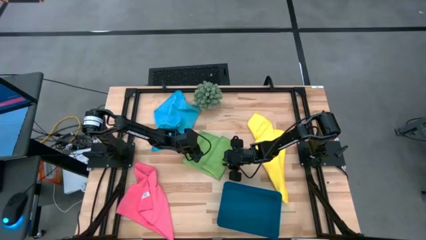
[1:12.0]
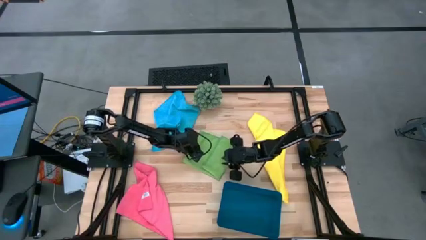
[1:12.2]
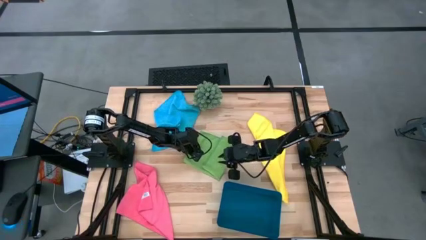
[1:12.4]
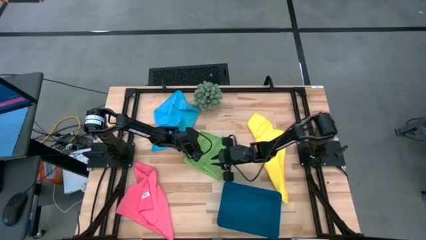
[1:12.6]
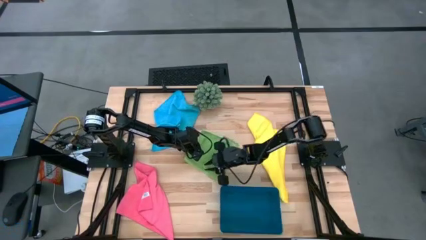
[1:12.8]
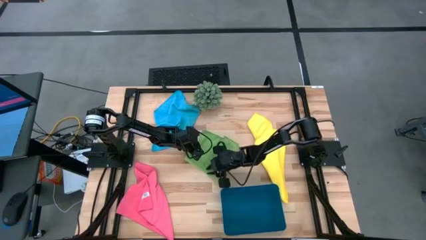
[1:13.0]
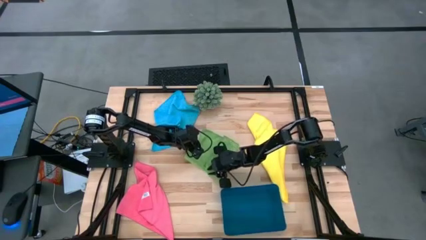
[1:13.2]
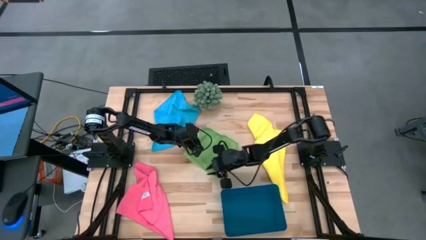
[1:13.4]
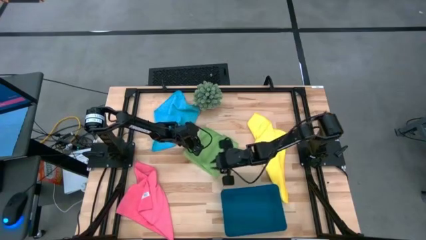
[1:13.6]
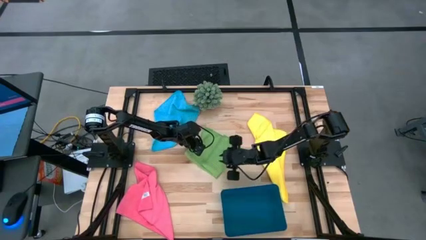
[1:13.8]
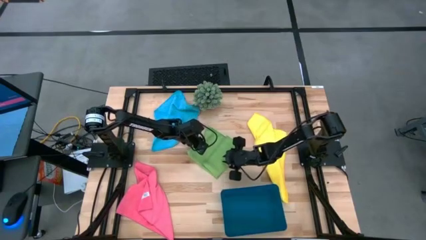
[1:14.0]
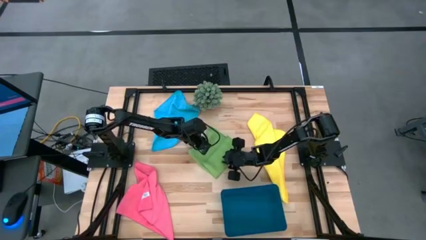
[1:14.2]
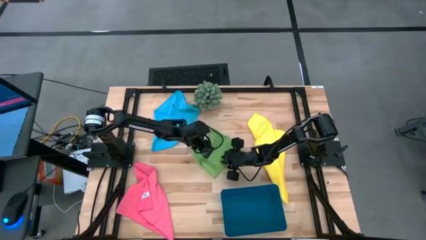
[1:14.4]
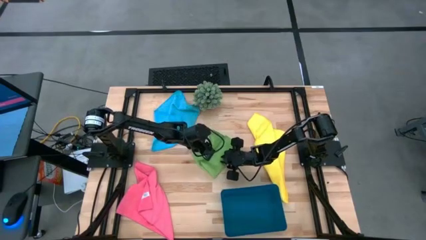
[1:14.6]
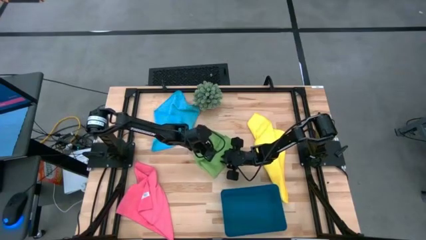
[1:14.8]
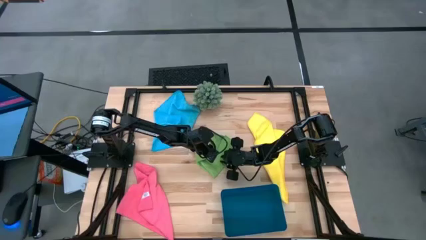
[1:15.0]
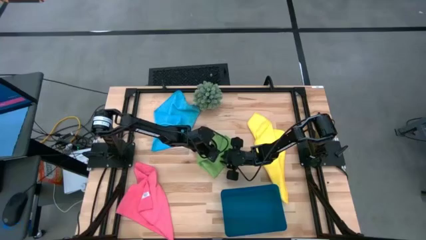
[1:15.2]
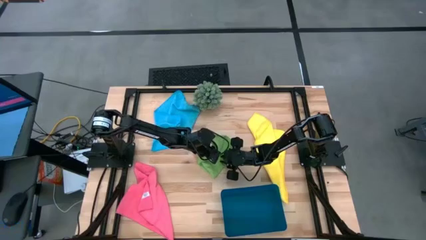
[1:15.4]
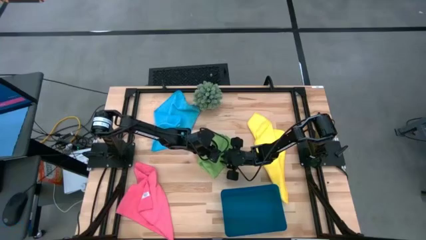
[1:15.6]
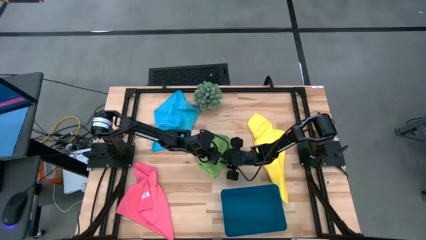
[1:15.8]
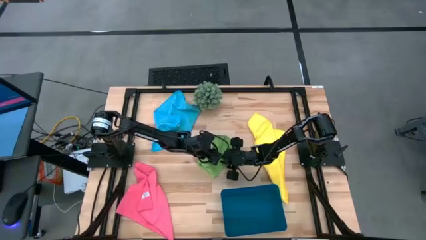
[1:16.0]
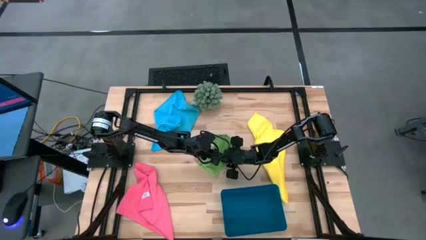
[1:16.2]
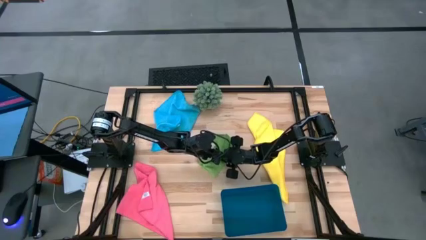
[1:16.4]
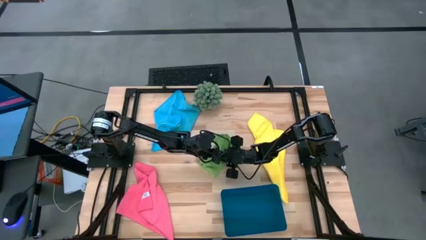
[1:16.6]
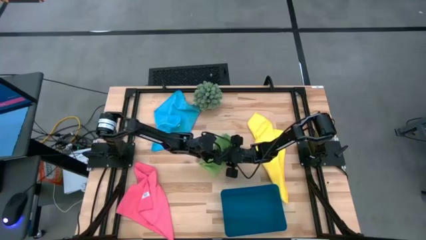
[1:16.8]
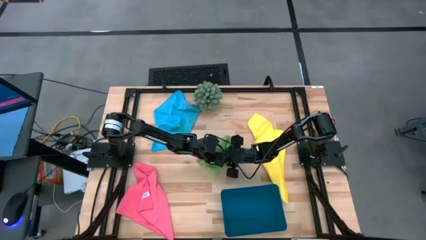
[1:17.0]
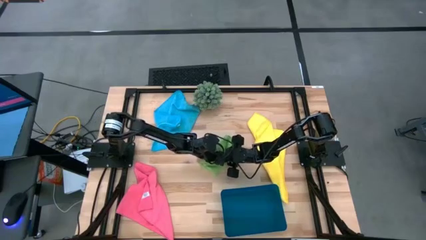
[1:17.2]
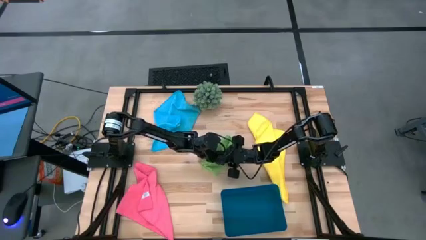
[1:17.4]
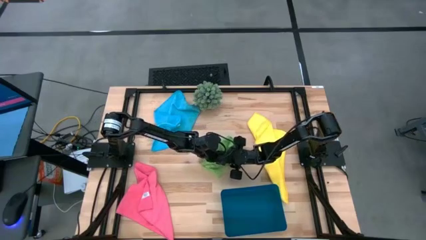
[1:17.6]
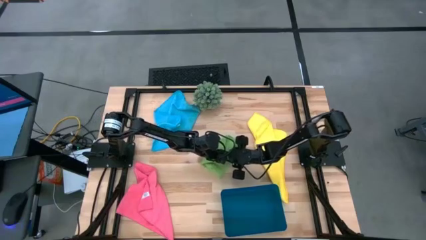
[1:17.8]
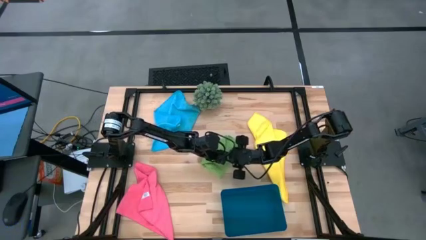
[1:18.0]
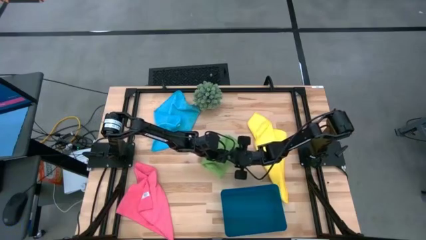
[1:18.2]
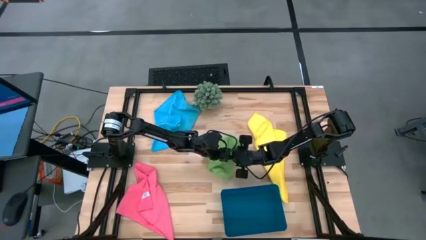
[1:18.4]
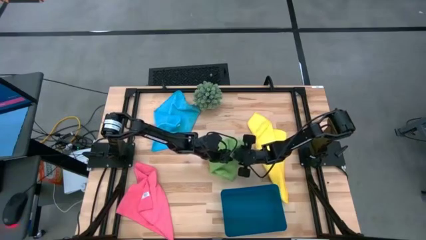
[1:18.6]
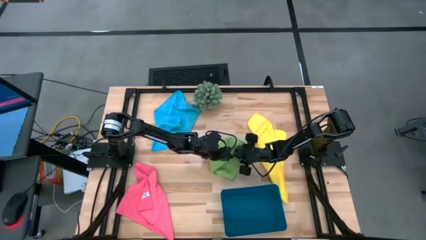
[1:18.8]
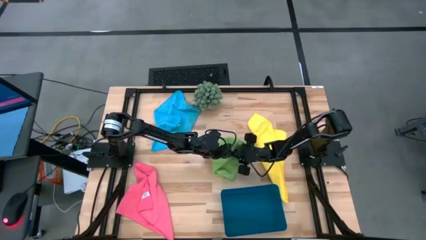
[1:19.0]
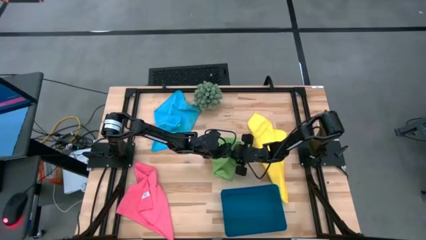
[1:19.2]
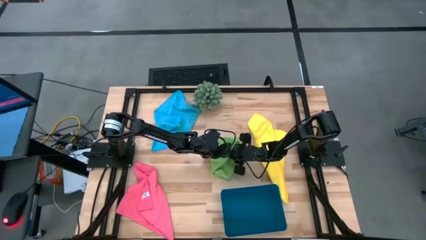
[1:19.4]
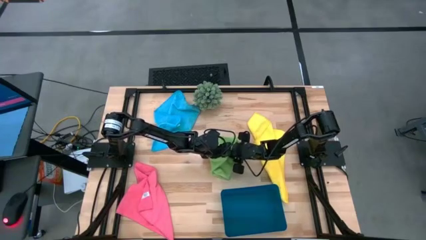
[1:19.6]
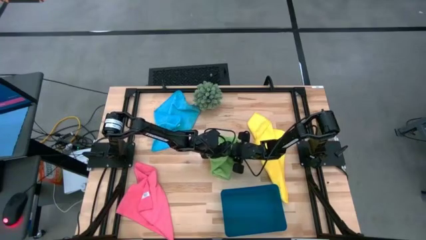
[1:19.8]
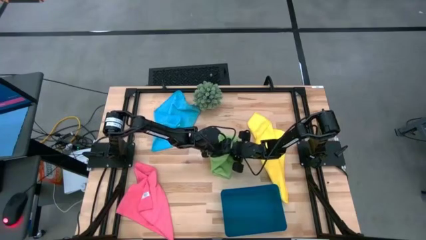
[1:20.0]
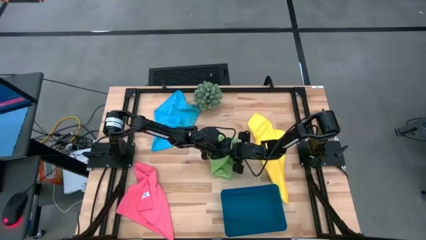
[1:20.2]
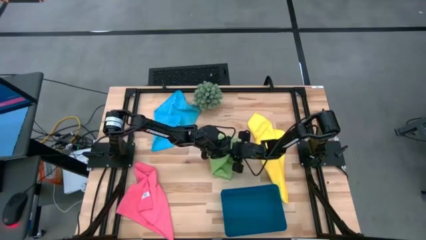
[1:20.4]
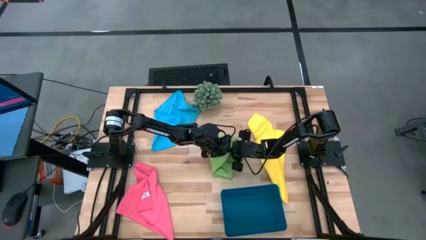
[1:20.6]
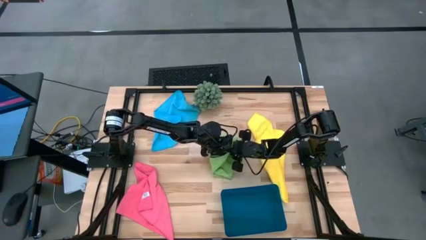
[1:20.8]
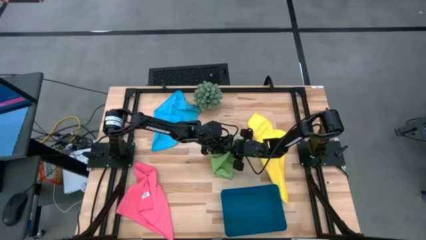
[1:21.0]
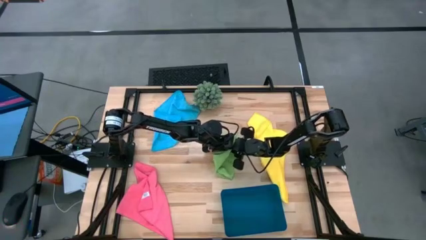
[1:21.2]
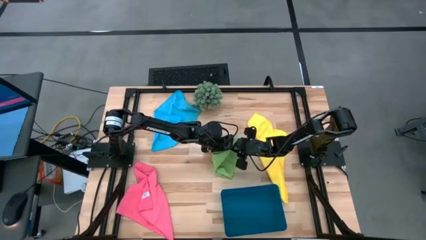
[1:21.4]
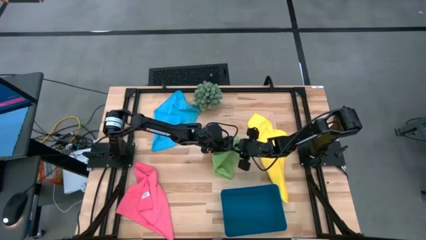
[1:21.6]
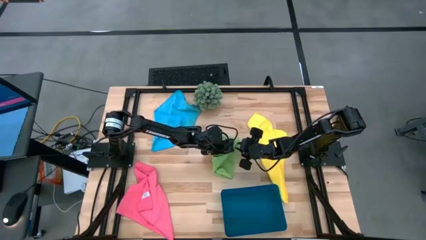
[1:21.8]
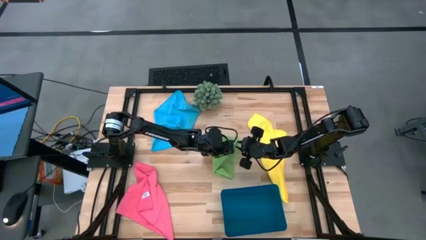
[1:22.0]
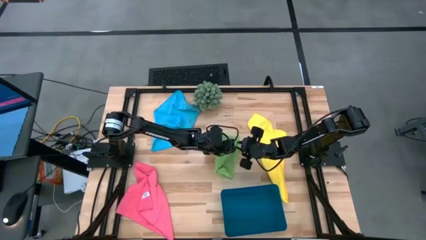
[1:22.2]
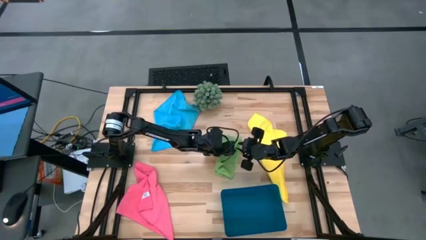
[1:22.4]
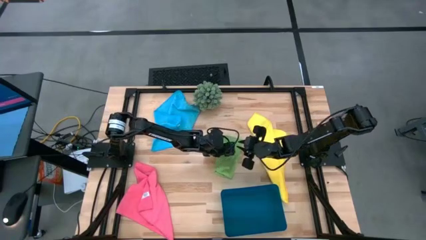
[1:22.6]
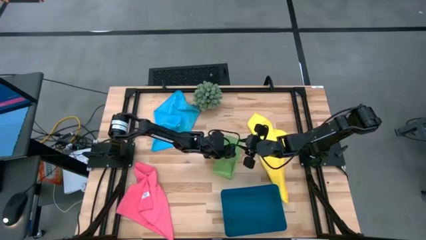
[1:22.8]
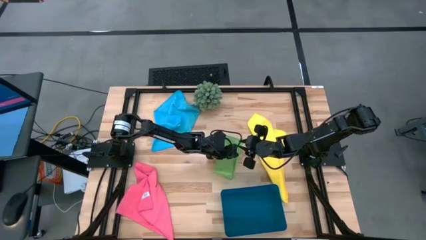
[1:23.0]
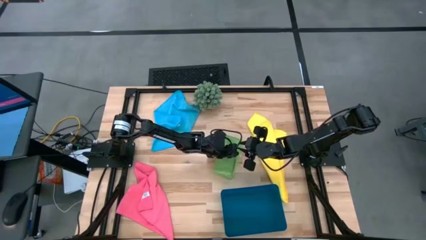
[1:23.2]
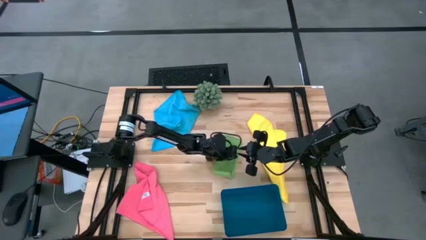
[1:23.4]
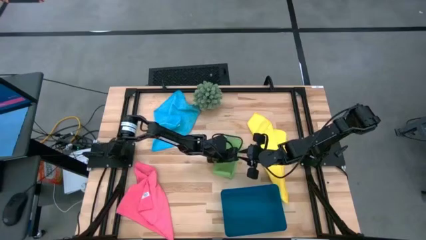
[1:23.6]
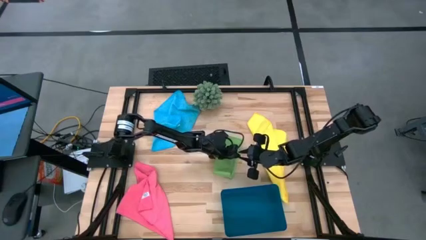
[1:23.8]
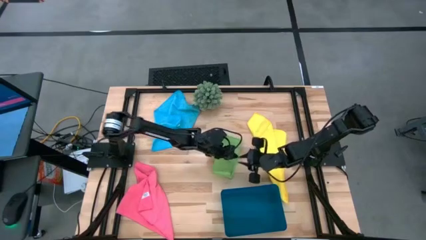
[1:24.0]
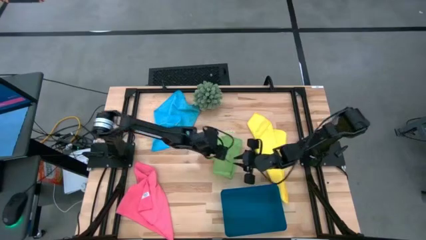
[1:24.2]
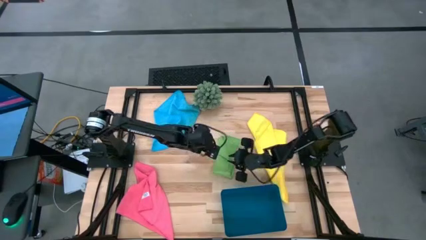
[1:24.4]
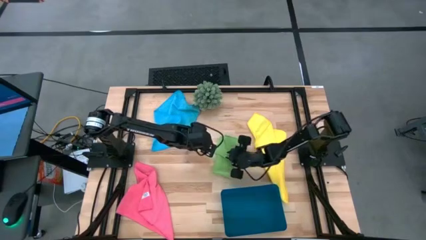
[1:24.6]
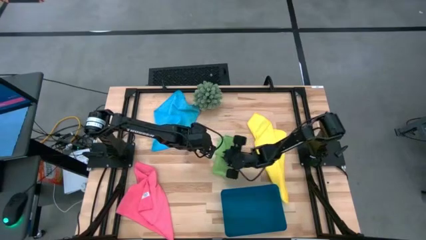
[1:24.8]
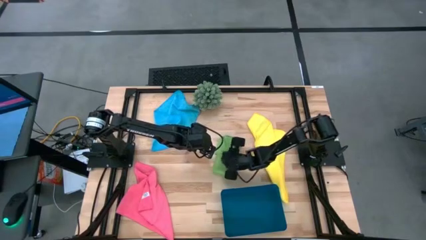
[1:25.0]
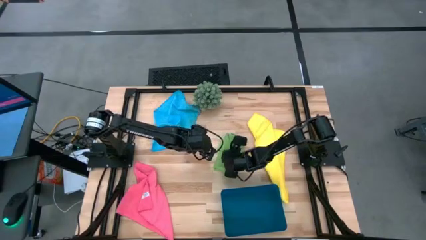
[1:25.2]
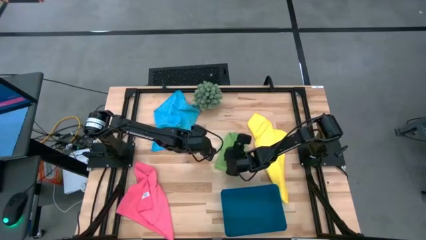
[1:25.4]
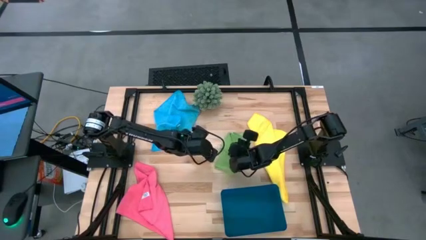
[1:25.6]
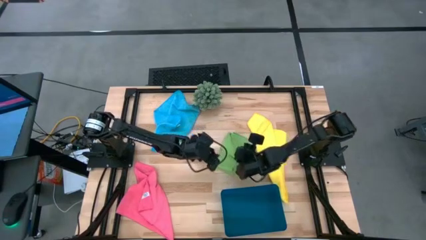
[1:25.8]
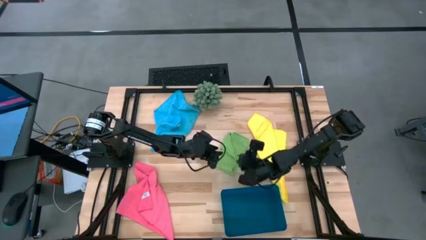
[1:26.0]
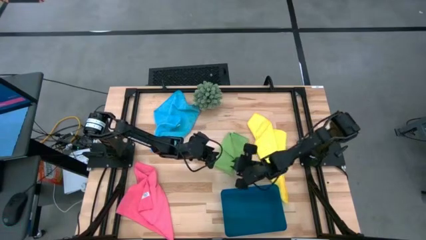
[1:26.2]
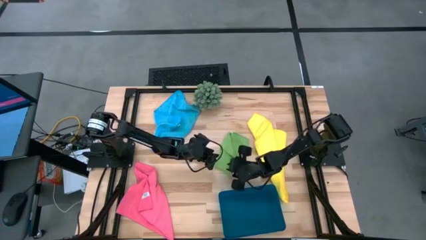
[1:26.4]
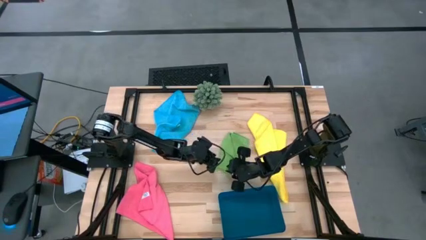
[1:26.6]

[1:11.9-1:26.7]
Task: Fold microfiber towels
Fold the green microfiber cloth

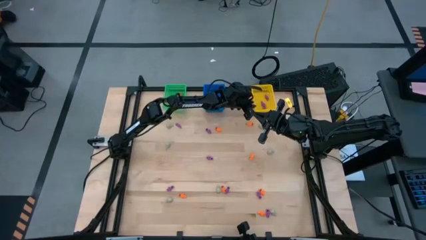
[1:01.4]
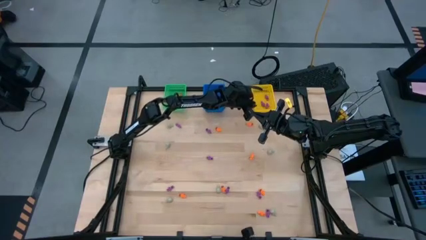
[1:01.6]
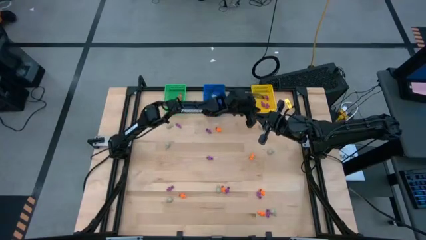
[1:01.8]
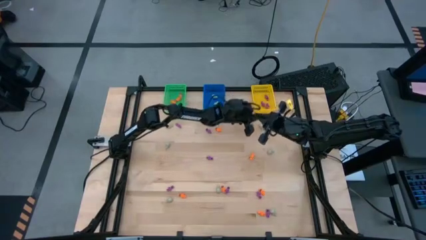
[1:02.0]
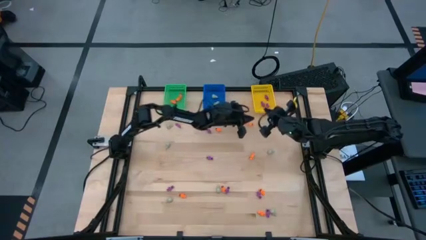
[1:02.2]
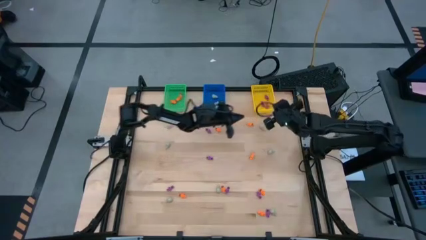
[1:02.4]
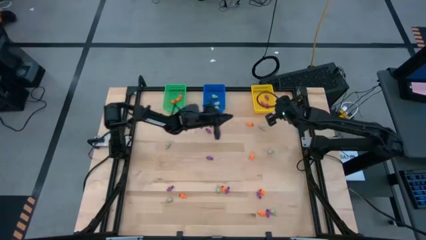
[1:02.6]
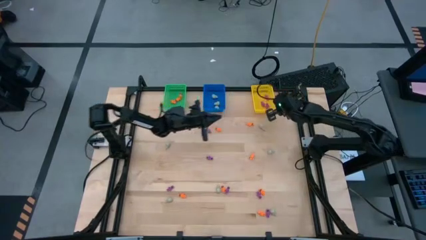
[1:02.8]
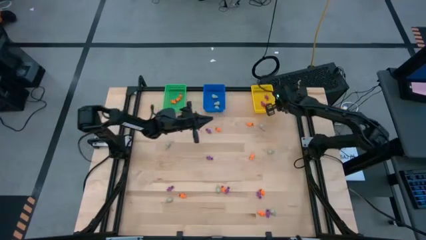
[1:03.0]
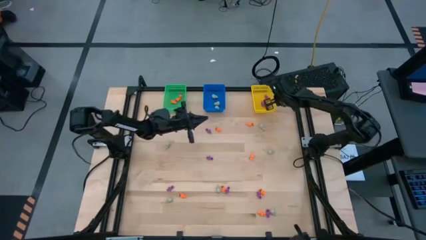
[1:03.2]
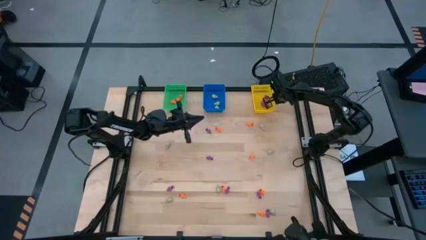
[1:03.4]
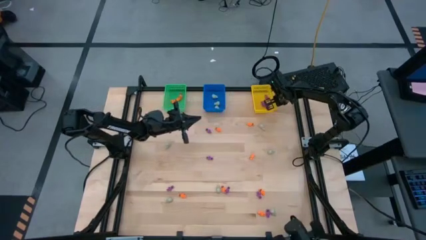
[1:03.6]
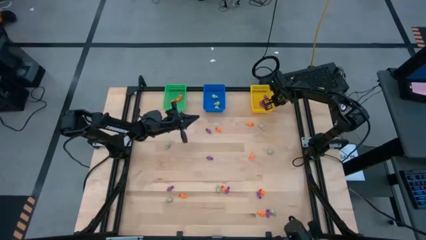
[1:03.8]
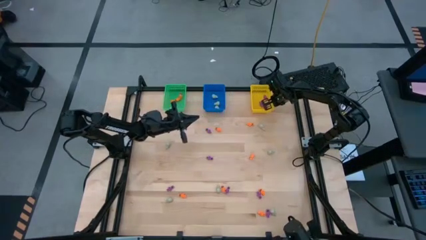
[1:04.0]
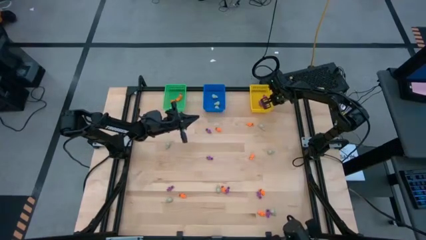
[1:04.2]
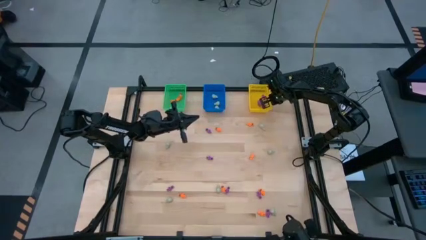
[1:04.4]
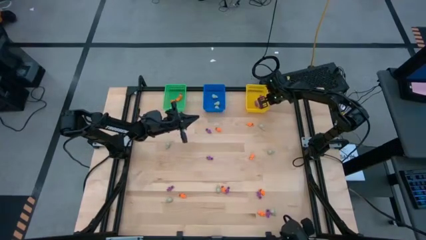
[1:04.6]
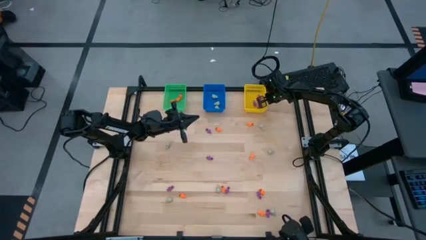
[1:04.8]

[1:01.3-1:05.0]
Task: Sort Halloween decoration
Adjust the yellow bin on the table
